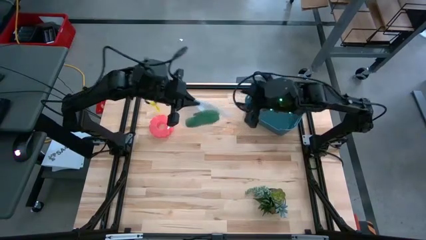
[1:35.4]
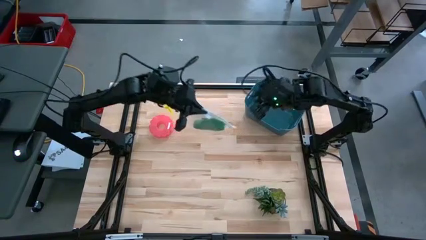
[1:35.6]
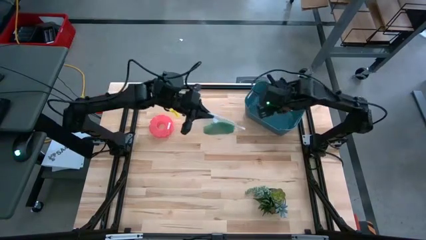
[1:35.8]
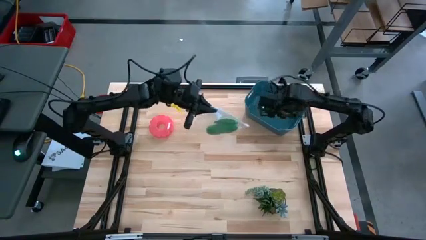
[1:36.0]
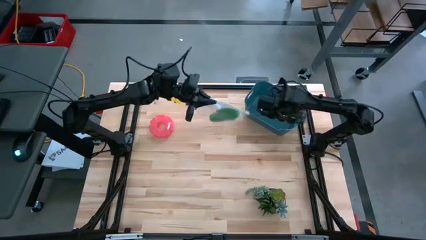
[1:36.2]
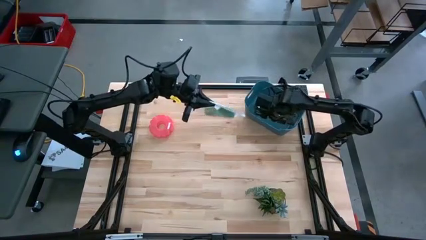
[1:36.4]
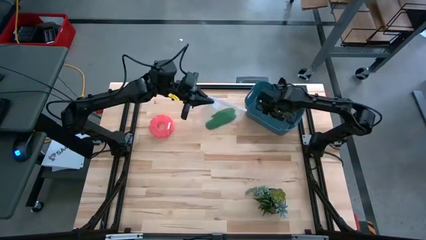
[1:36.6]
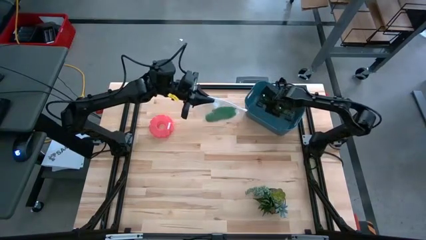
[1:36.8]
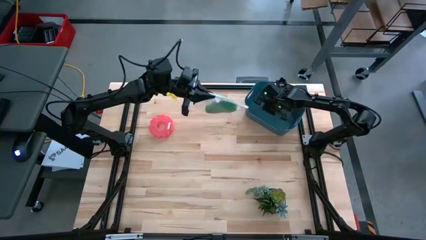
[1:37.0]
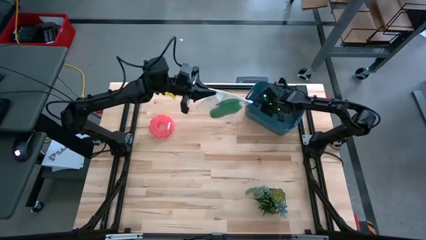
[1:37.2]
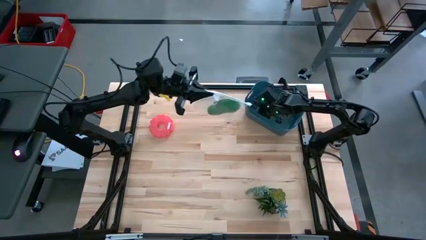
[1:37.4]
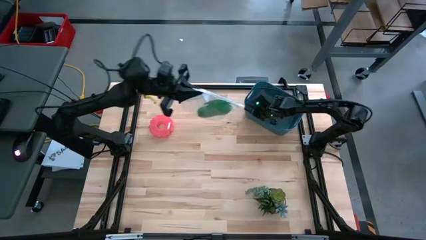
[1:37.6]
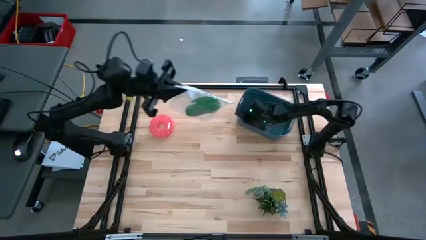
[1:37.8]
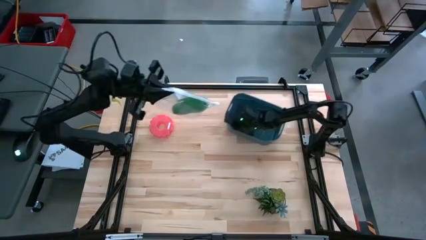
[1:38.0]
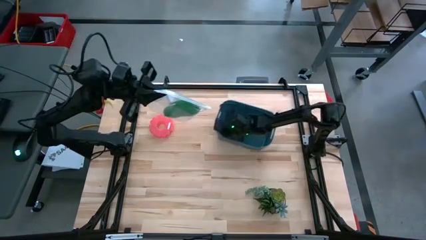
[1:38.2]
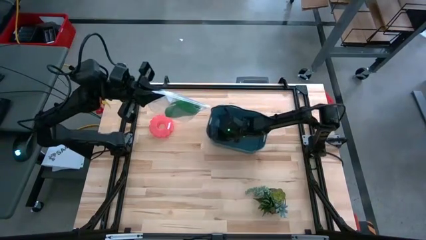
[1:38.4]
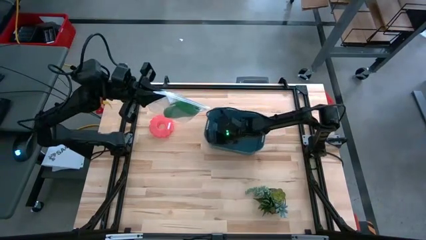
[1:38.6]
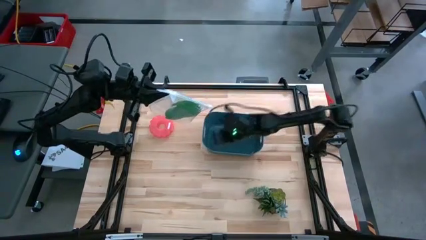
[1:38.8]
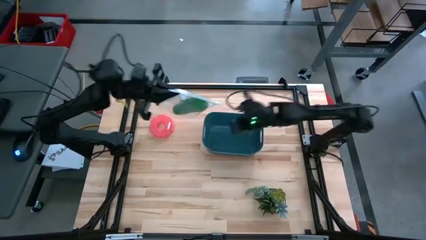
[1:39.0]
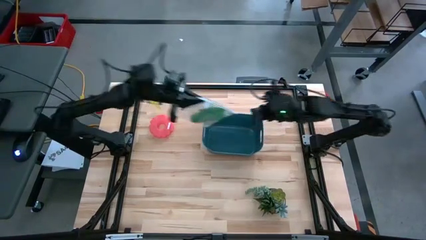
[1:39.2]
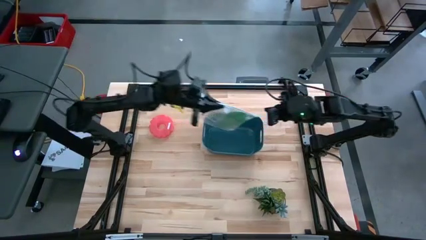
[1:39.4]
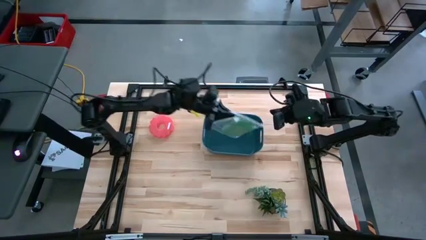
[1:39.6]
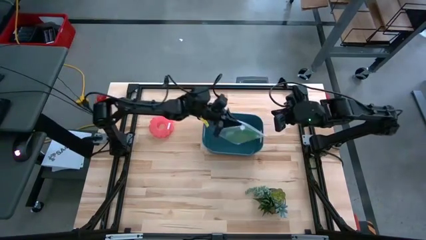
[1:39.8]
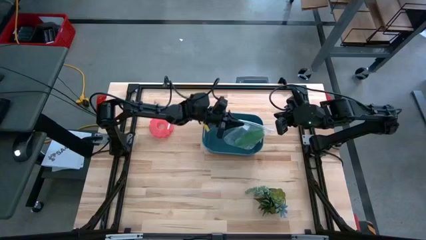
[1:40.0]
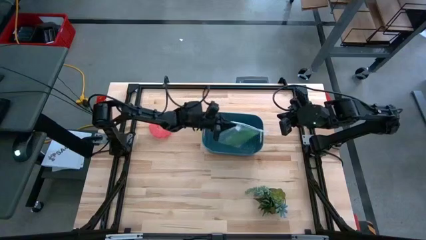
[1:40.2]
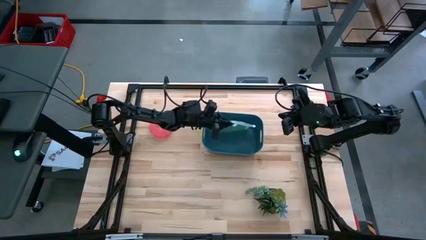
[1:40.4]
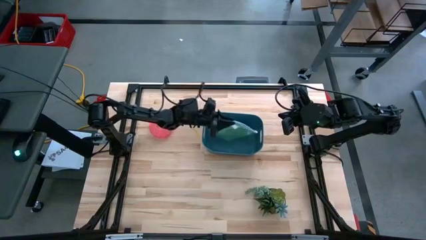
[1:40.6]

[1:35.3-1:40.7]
Task: Roll bandage
Put the packaged green bandage into the blue bin

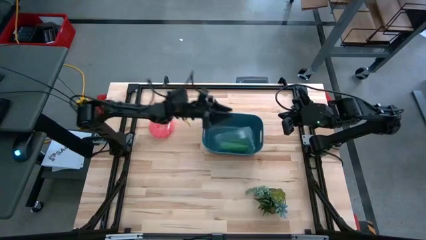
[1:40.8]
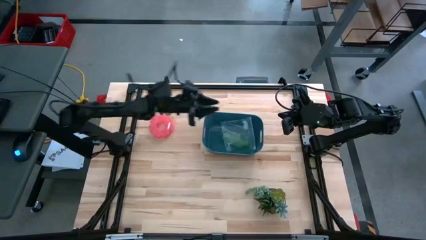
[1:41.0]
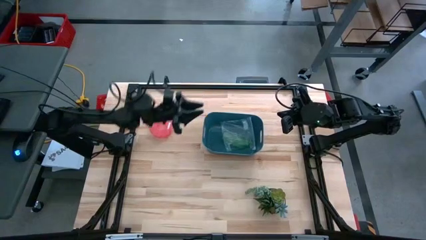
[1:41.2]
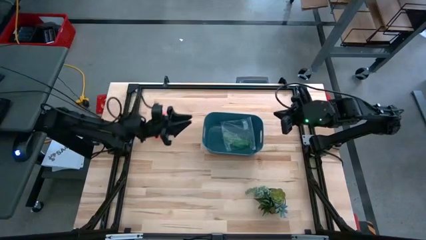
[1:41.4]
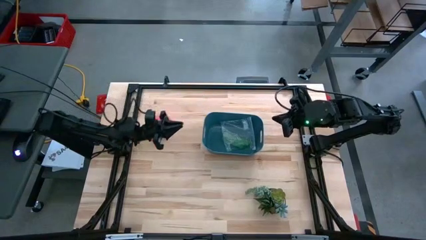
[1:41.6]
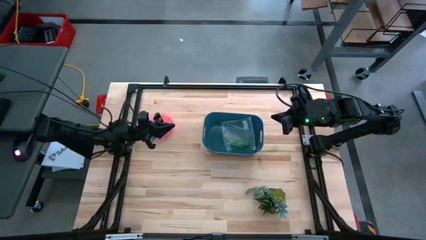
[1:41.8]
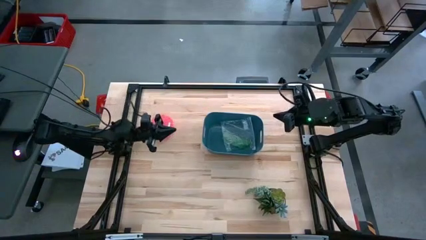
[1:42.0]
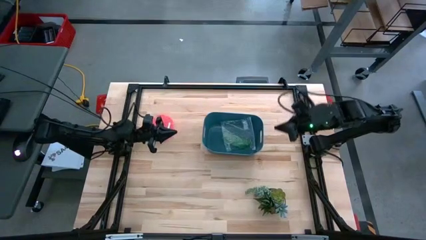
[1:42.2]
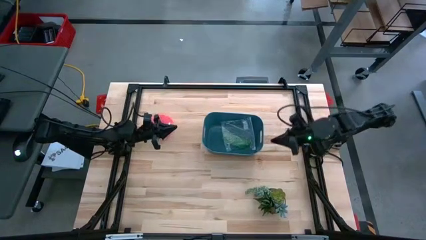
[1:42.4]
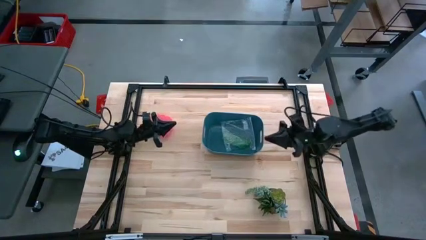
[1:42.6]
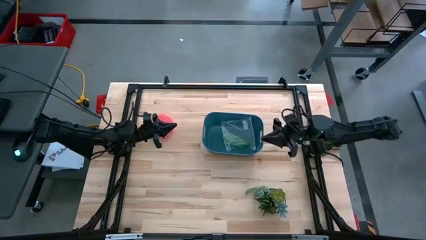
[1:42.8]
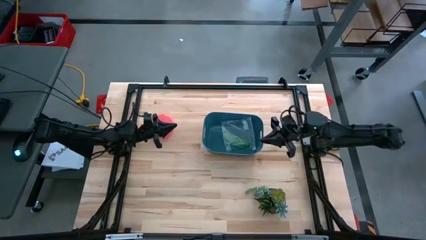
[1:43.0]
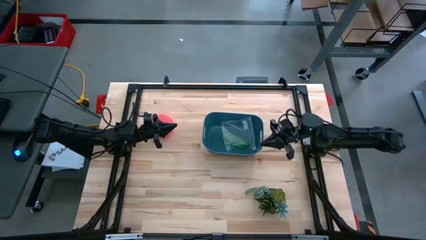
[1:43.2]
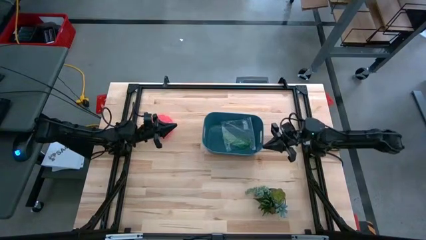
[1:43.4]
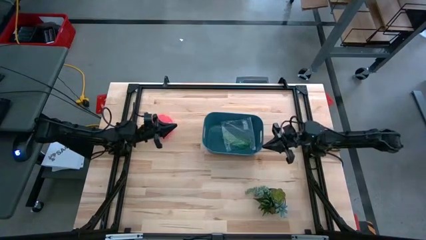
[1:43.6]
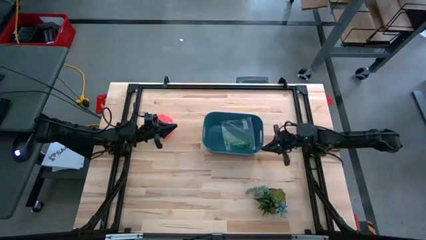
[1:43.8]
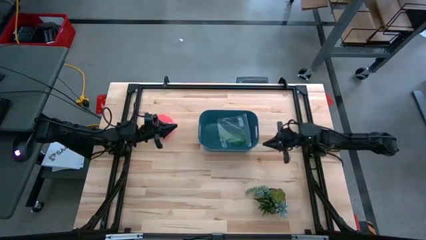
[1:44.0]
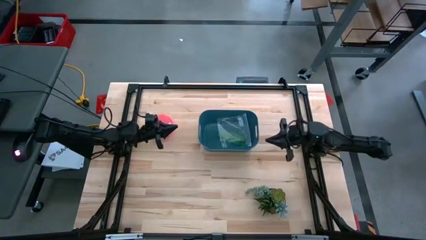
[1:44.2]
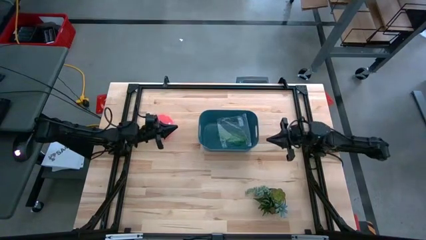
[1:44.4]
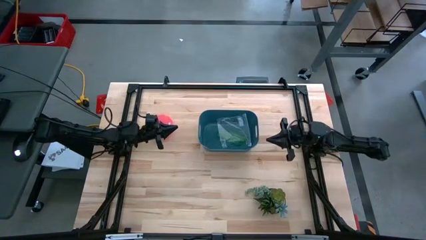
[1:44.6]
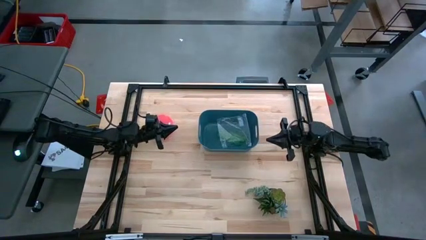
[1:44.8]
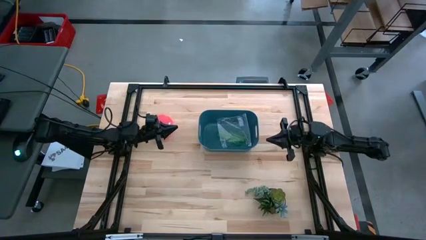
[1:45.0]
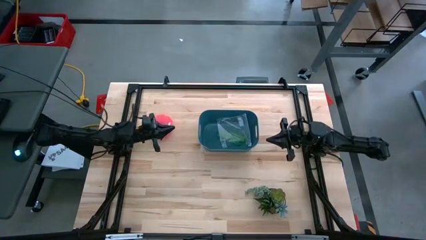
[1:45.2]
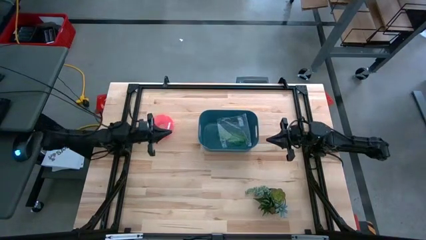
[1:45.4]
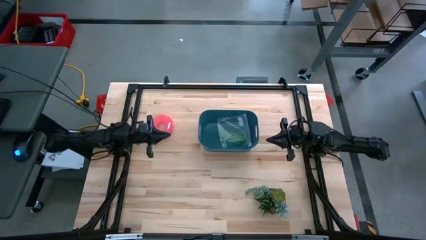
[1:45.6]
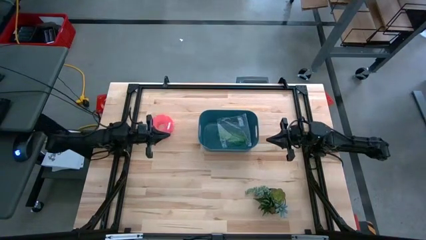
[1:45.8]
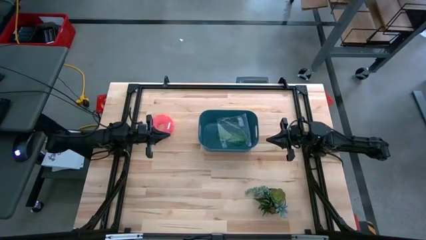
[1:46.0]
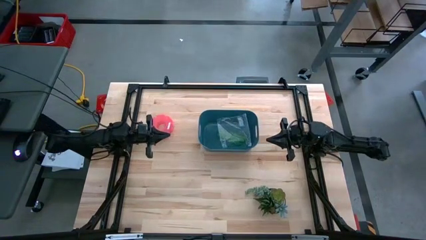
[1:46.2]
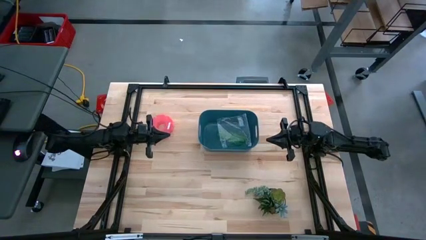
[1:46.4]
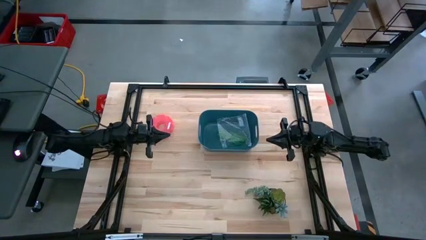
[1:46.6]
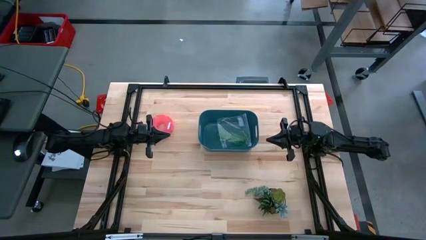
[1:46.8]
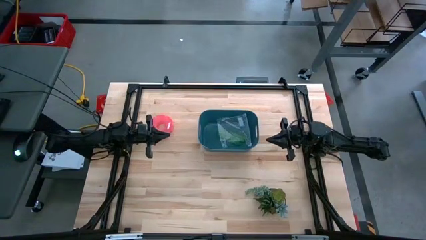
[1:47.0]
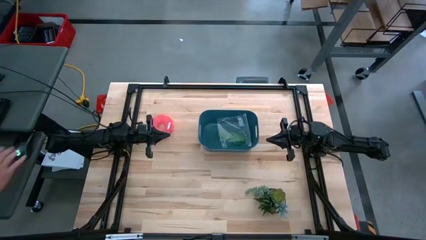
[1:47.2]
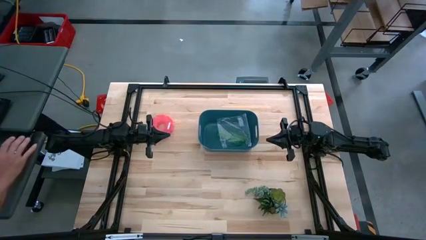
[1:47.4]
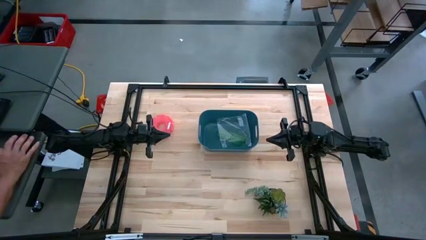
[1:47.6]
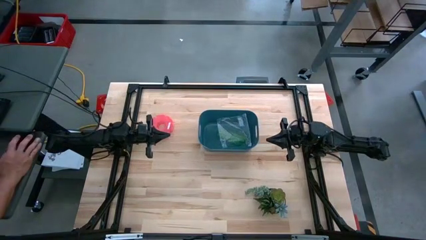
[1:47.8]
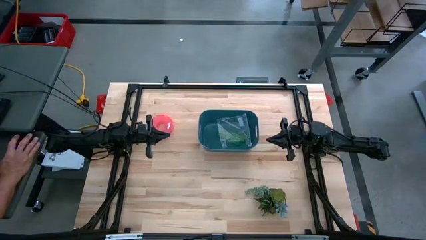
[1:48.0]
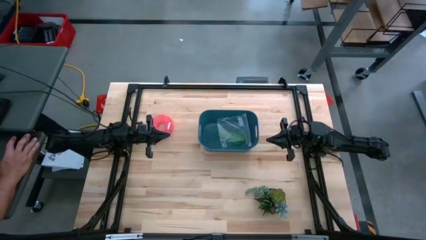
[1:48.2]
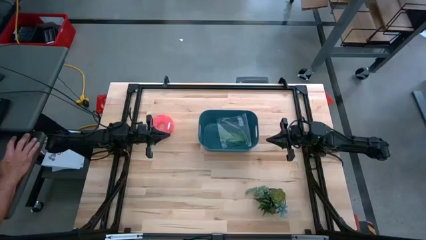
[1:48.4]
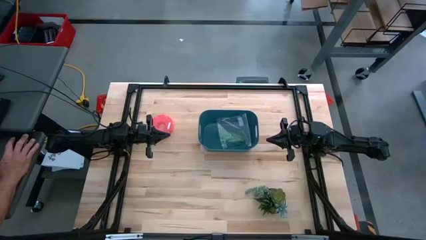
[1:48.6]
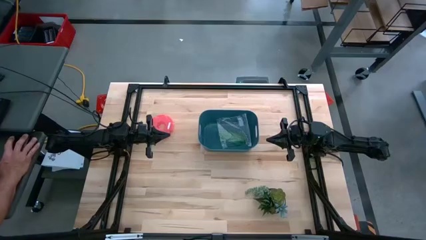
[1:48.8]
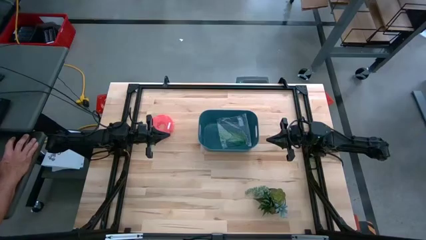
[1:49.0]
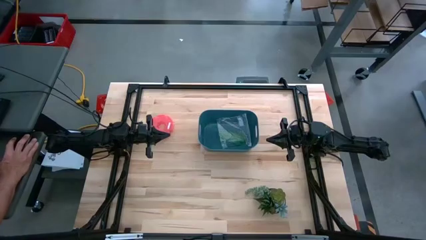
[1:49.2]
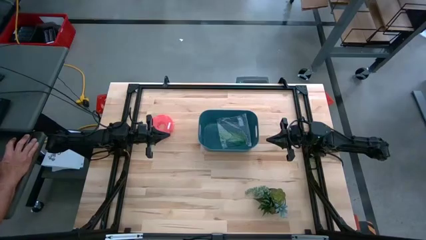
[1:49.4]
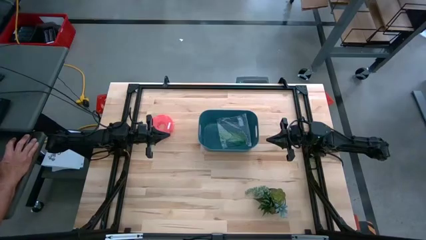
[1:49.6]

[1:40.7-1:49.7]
Return to Home Position

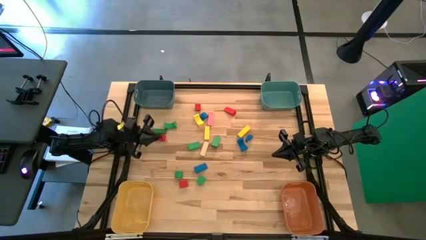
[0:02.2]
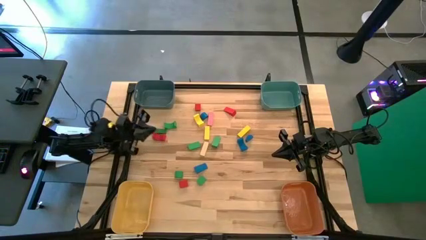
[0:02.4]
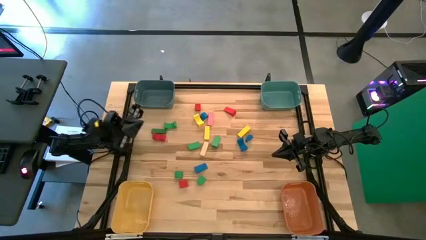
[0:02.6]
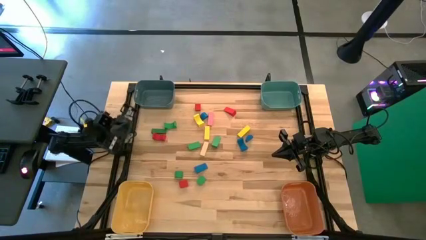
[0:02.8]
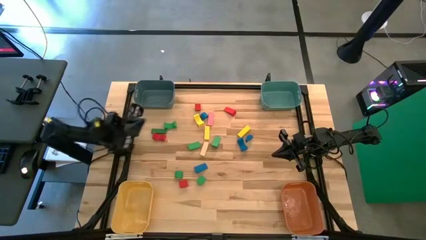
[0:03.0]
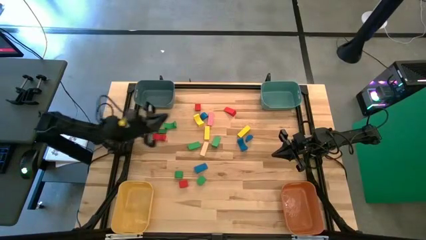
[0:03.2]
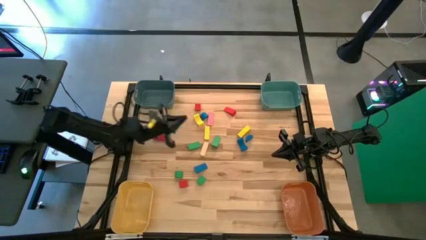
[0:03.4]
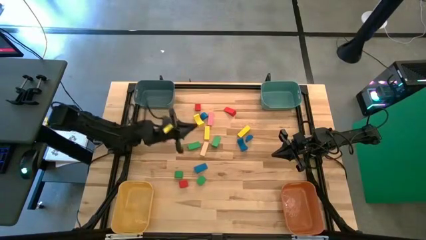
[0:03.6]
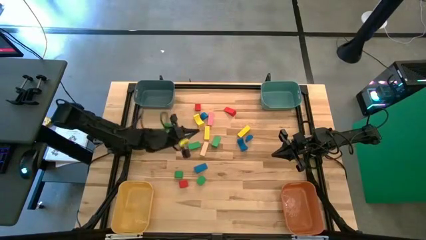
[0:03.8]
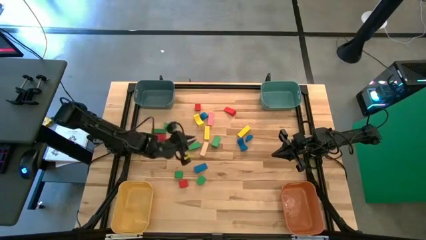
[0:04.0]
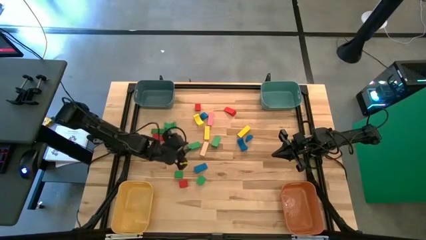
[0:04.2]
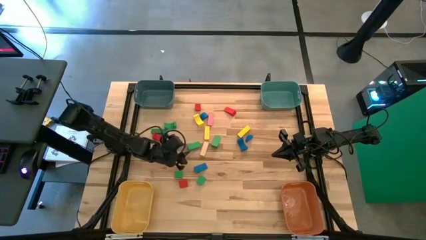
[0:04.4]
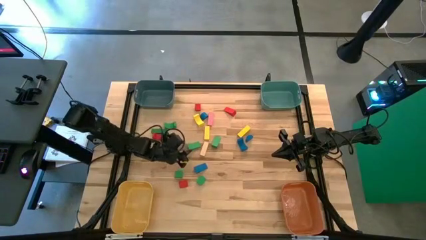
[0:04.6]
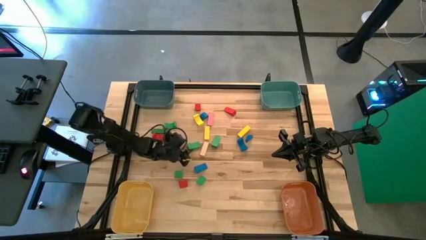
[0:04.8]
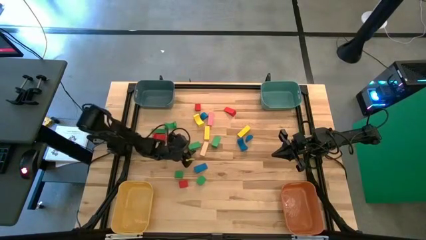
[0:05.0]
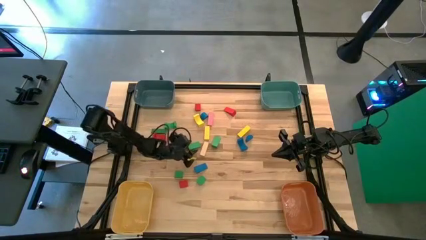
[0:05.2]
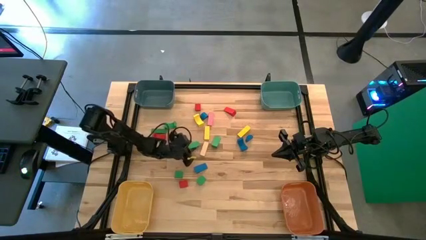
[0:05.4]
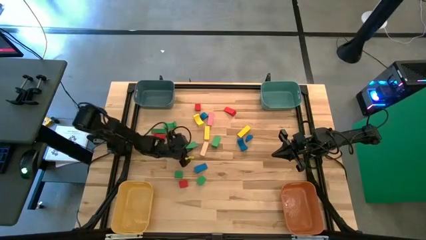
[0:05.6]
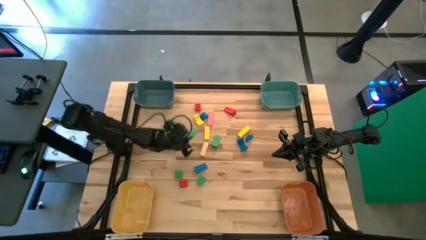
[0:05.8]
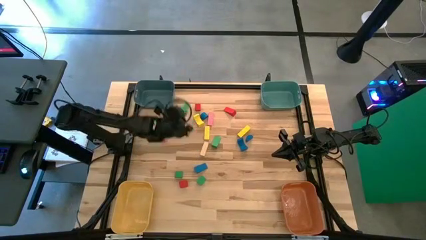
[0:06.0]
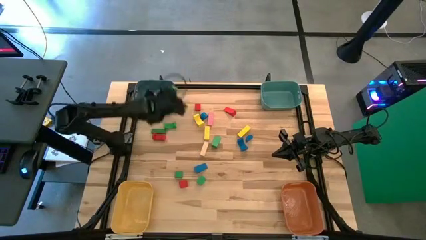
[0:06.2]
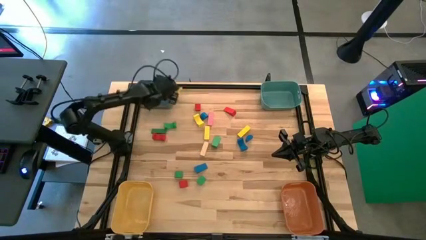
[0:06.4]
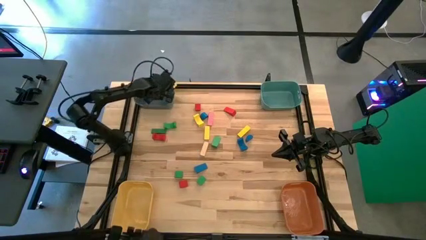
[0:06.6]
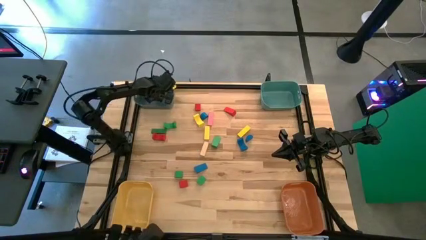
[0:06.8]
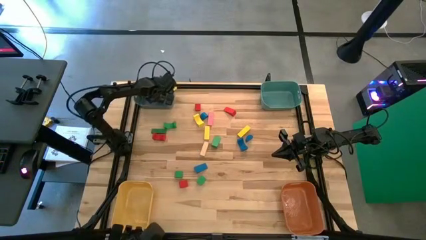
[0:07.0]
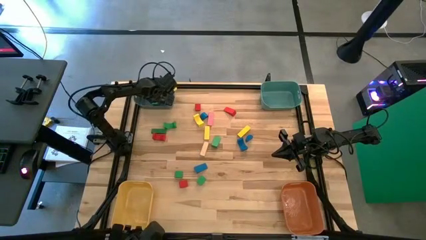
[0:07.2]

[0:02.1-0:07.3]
Task: Sort blocks by size
Put the left green triangular block into the blue bin
